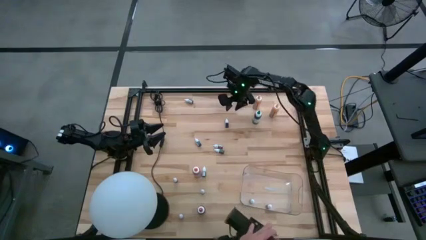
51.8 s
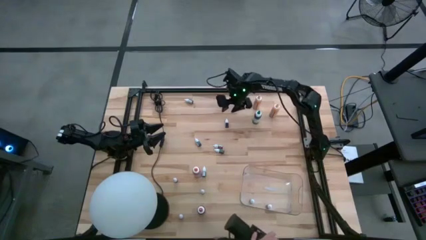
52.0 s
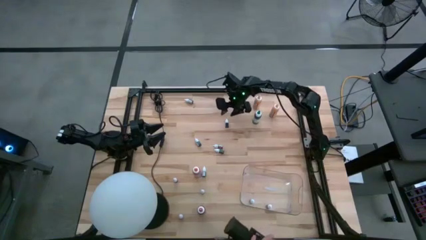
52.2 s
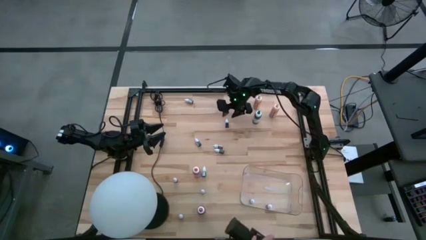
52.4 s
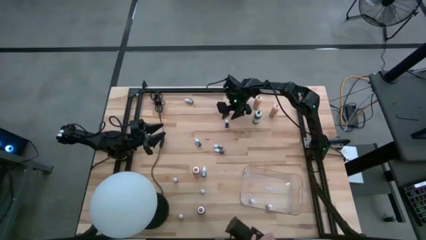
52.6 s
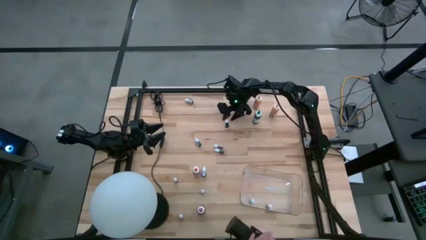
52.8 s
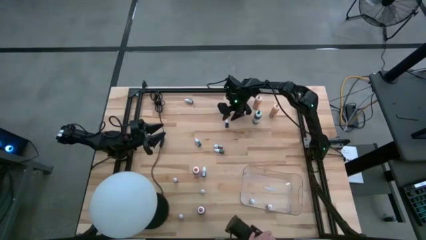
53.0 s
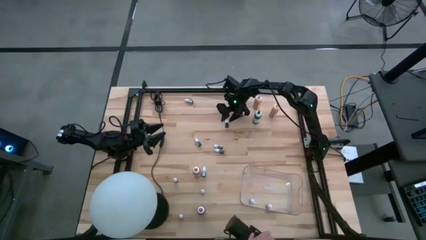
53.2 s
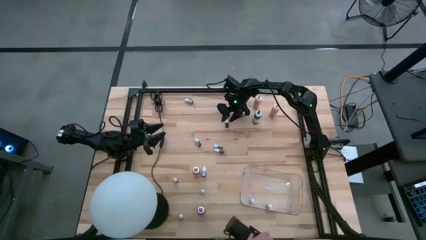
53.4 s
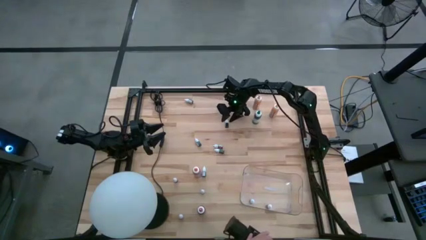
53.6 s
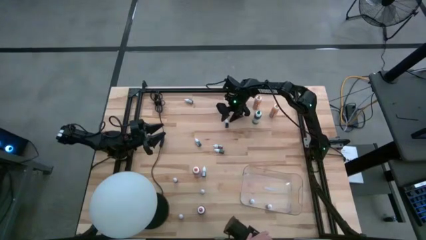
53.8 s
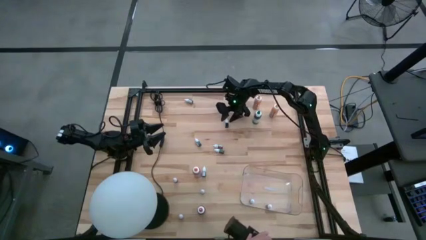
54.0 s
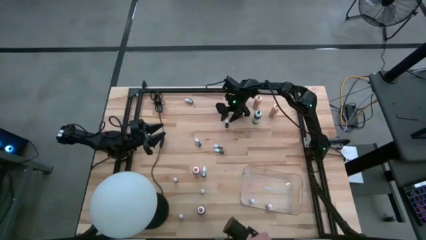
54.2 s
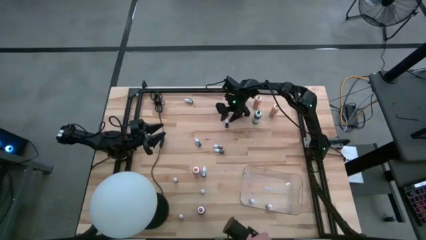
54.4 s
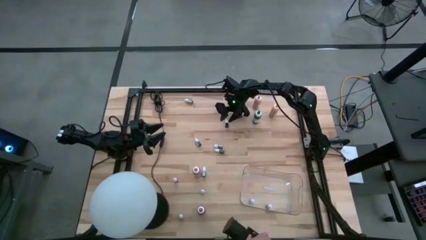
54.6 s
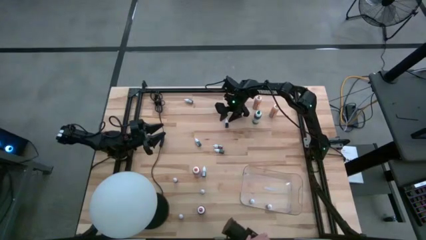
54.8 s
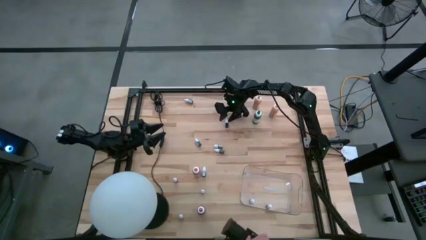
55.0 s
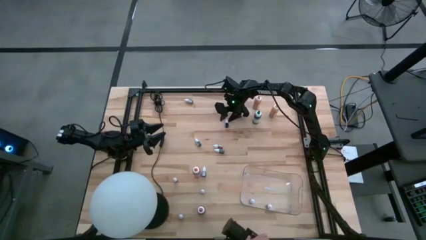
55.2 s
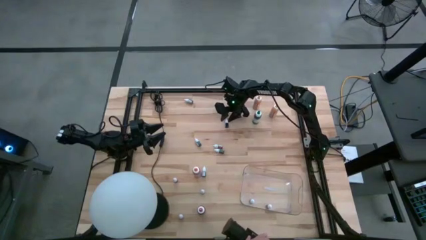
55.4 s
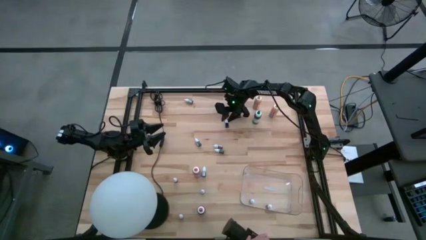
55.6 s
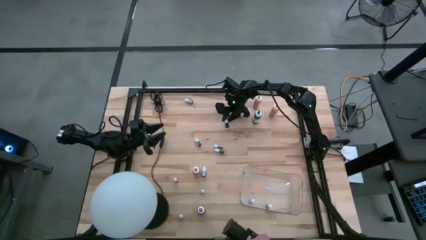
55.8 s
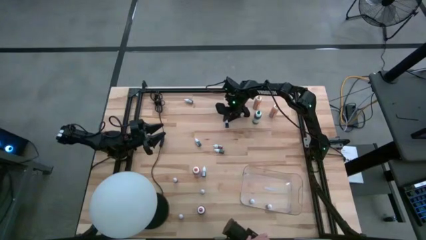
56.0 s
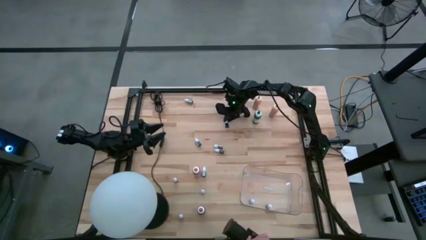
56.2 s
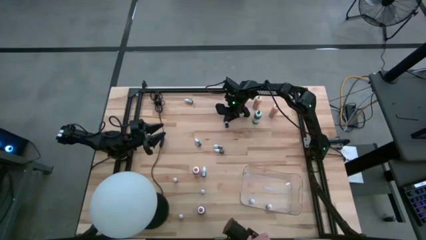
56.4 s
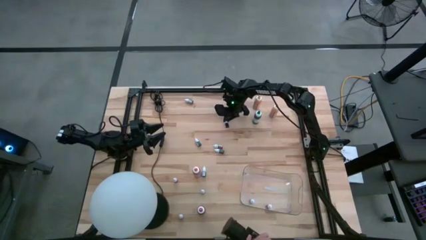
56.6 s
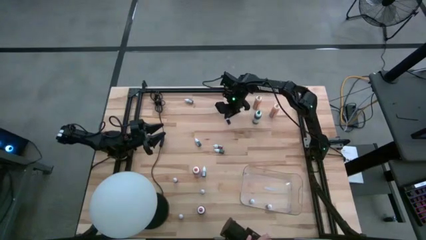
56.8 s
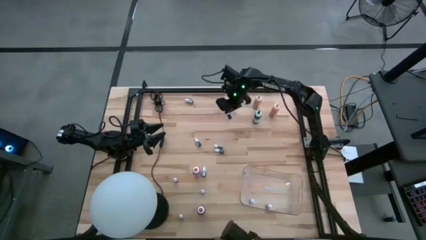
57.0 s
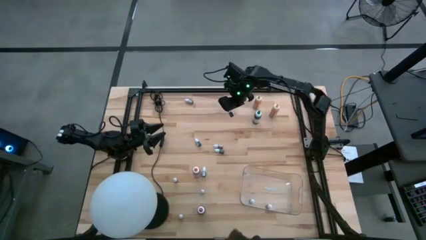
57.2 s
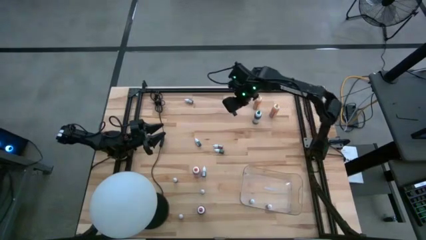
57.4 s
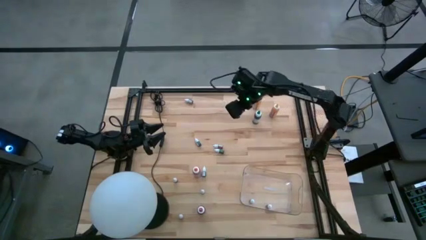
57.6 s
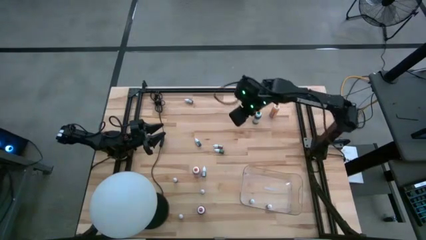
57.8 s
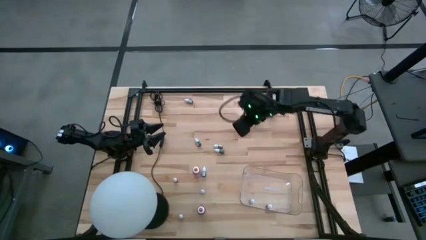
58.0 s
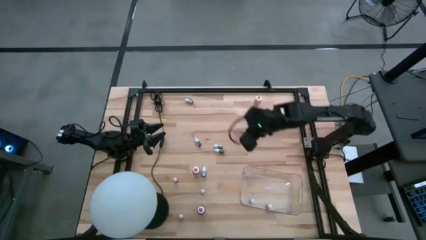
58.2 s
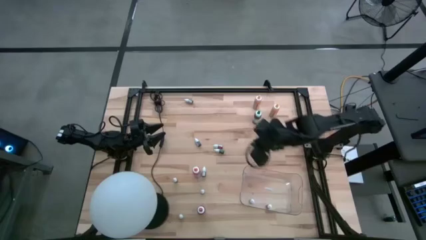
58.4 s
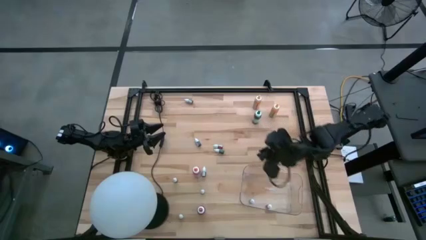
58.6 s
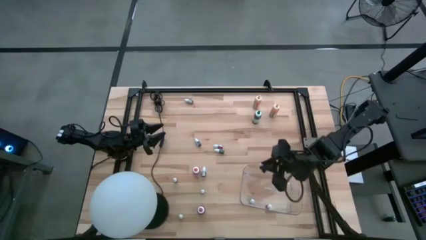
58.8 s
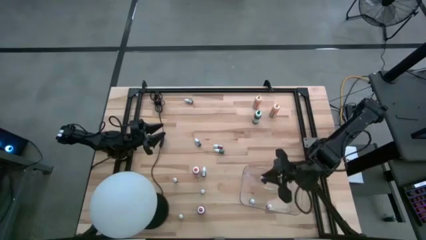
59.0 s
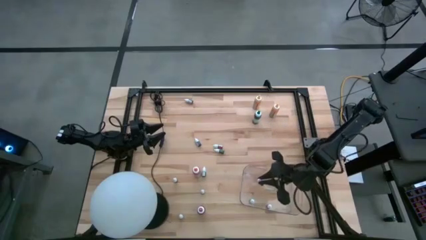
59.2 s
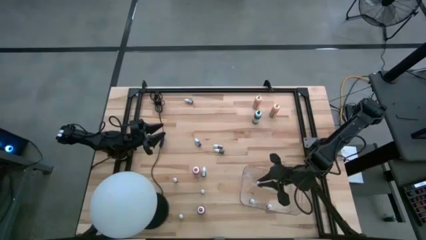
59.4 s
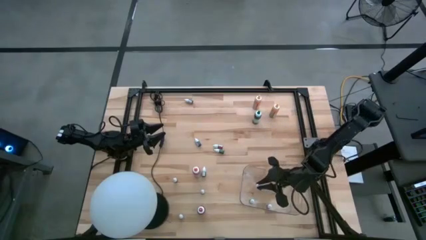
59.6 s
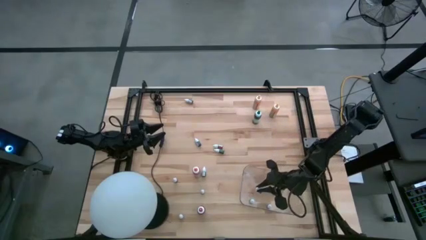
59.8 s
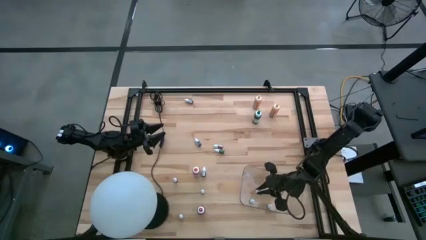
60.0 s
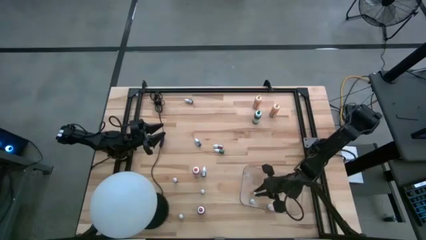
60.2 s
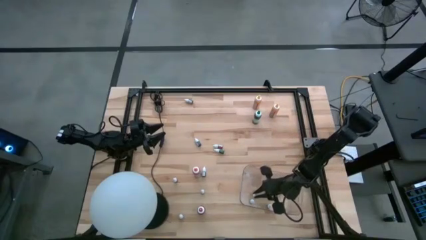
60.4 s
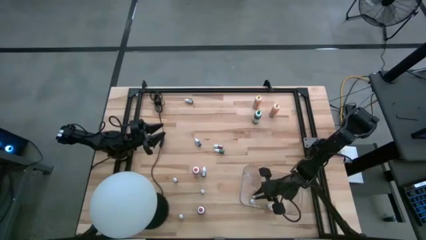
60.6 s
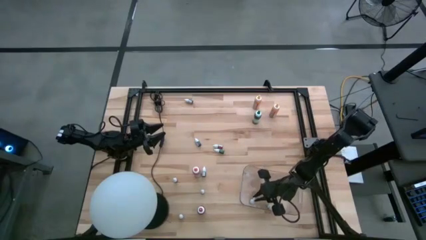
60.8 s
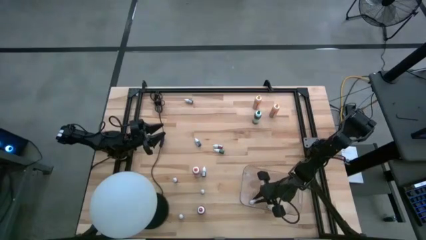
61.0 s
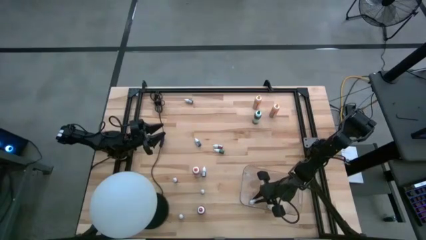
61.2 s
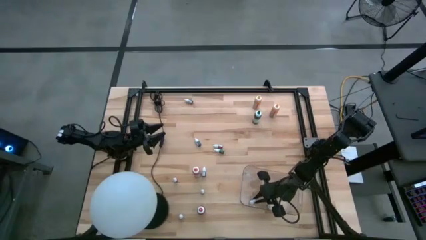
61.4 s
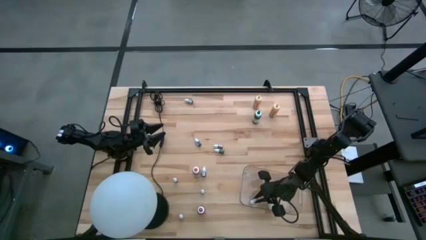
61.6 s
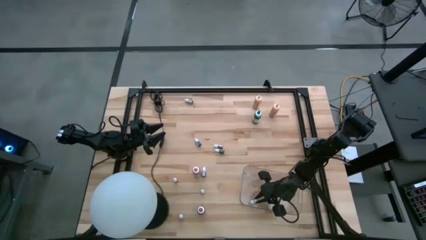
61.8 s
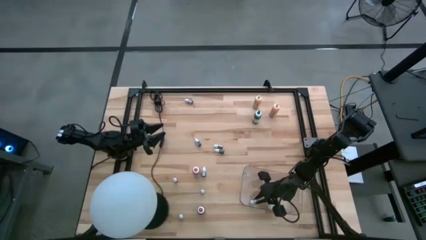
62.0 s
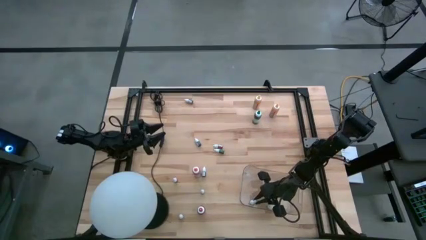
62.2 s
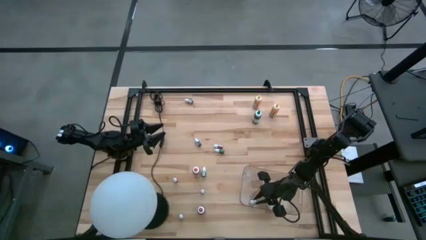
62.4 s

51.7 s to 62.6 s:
Task: Pick & Place food coloring
Put the black food color into the transparent bin

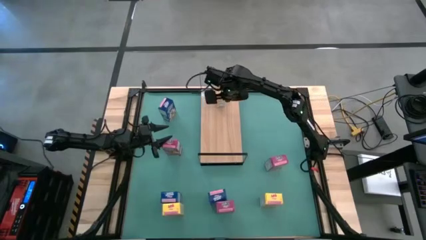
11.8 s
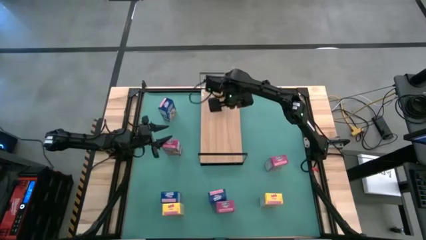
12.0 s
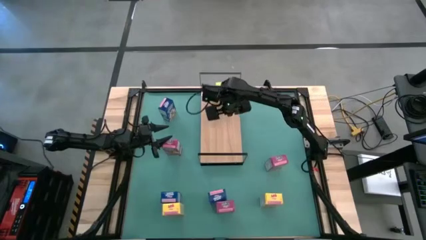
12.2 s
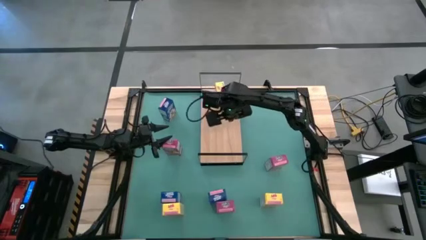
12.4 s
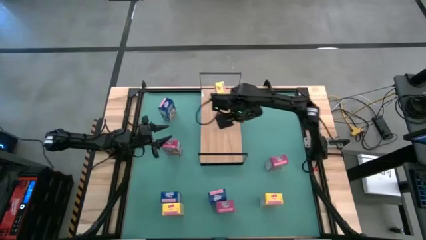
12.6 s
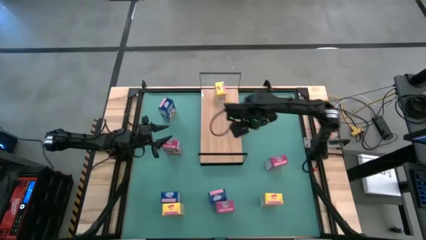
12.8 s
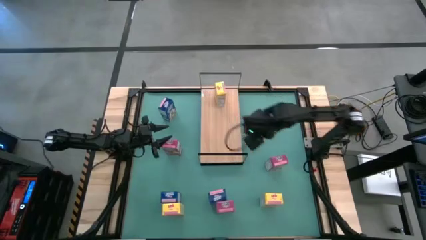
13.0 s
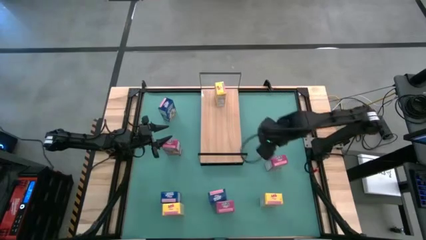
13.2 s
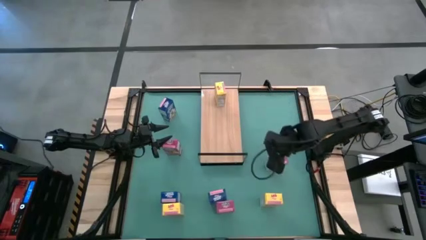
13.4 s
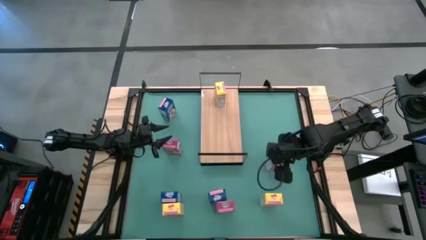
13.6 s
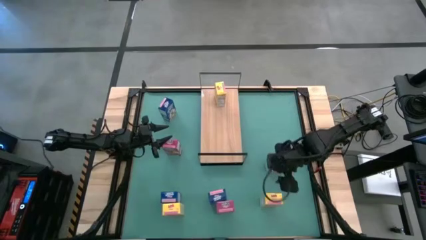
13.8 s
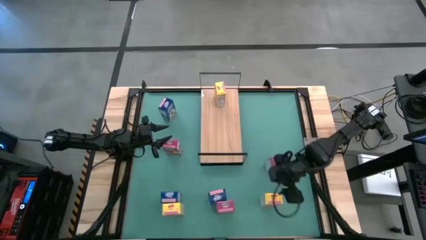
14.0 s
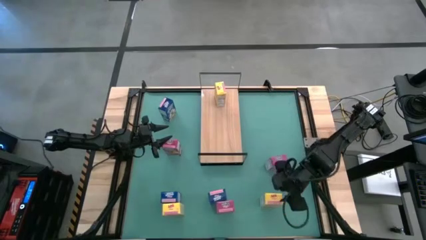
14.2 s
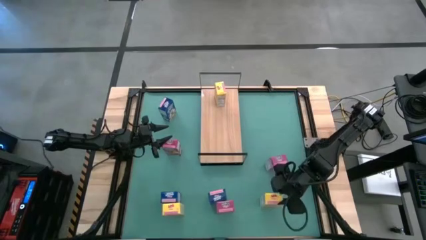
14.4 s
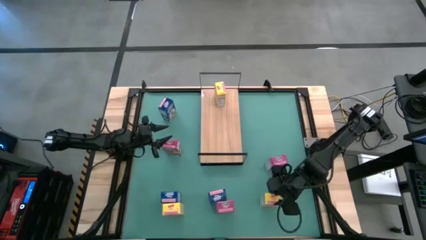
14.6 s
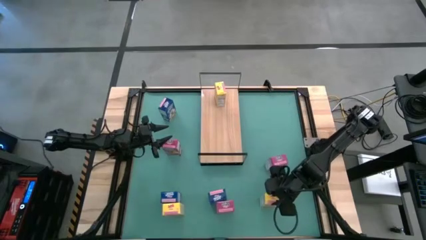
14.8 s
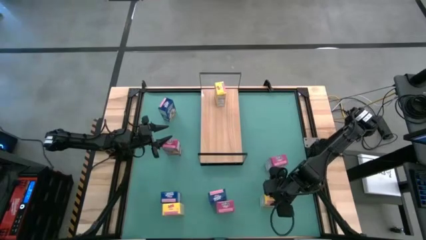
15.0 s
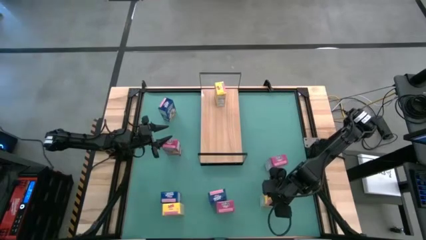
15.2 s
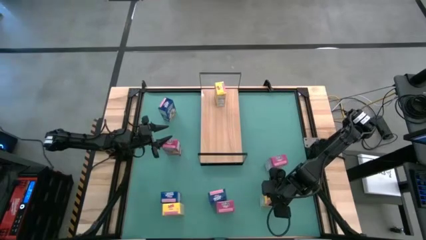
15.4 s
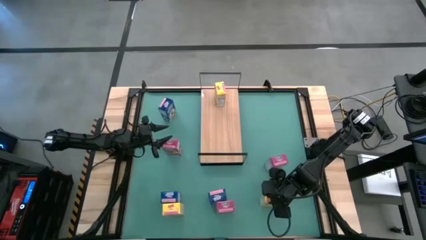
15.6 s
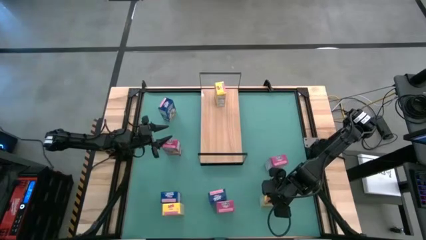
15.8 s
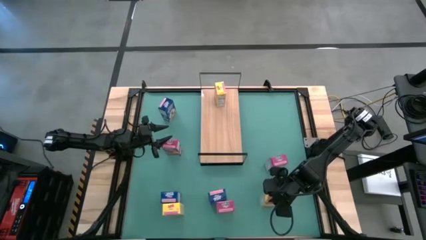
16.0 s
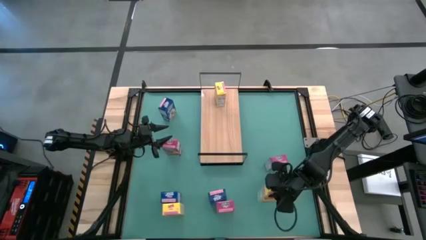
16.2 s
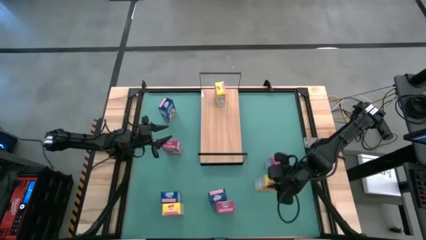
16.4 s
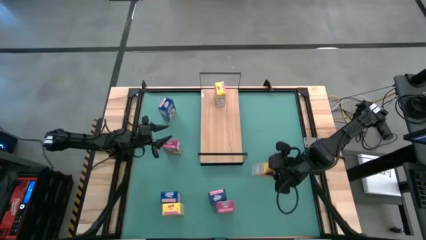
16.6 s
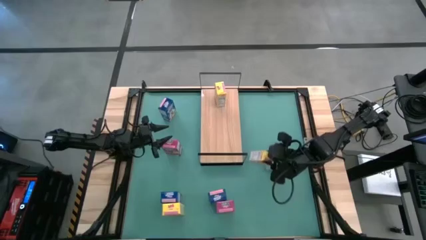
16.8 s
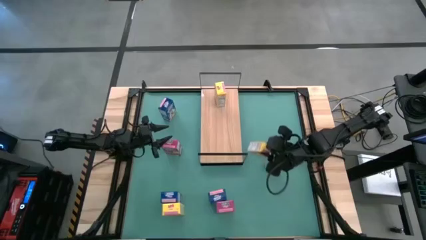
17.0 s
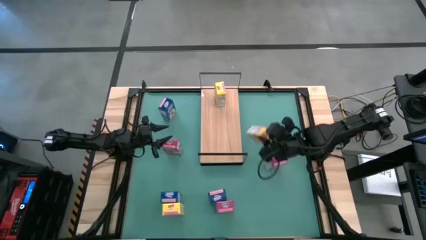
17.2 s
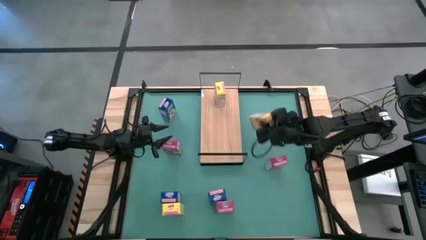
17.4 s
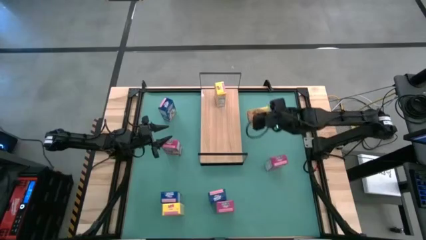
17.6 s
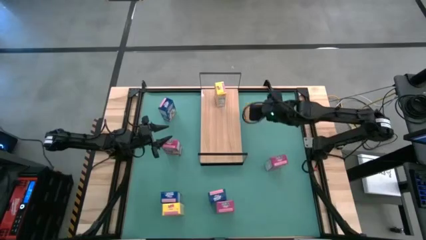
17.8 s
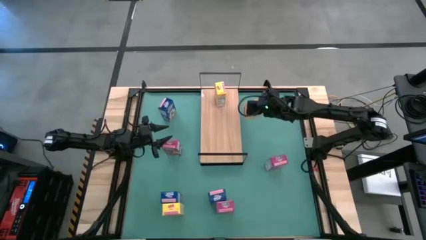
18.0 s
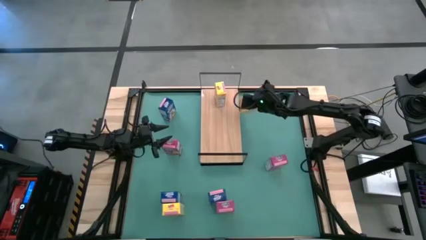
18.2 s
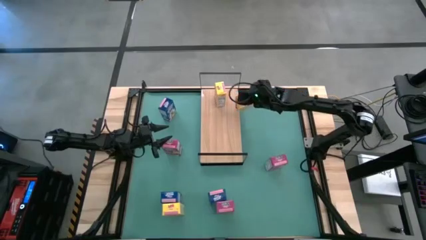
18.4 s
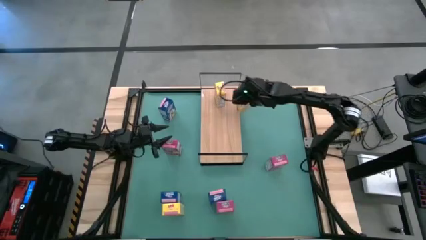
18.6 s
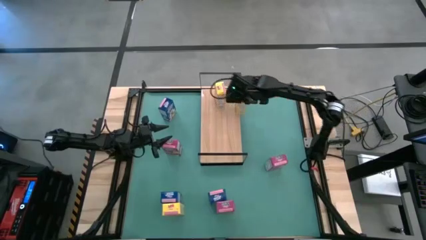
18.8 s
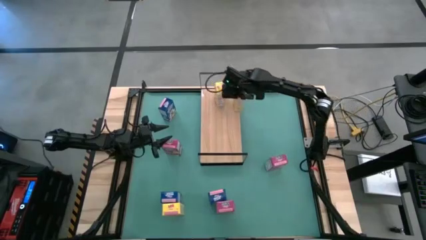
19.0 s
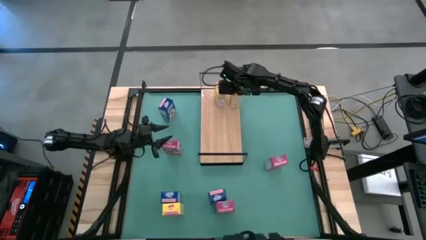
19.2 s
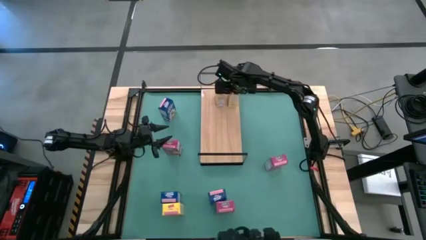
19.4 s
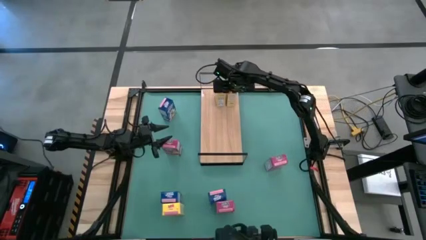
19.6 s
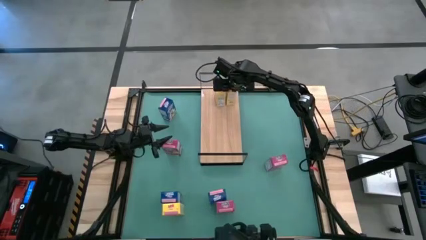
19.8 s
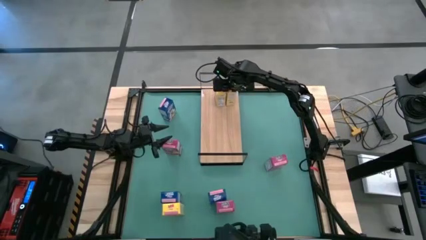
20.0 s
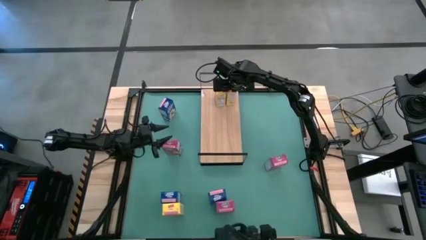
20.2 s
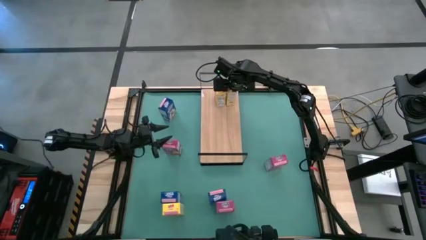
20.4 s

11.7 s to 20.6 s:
Task: Stack cereal on shelf
Put the right yellow cereal box on the shelf aligned with the other yellow cereal box
